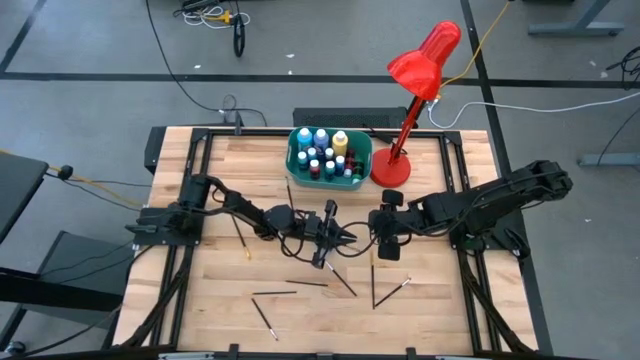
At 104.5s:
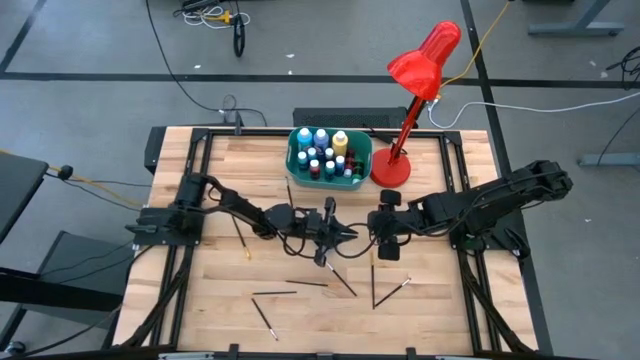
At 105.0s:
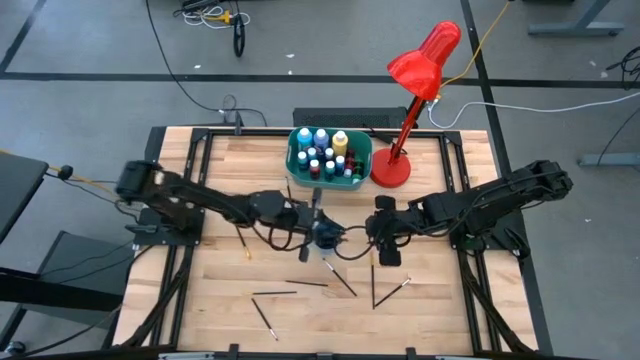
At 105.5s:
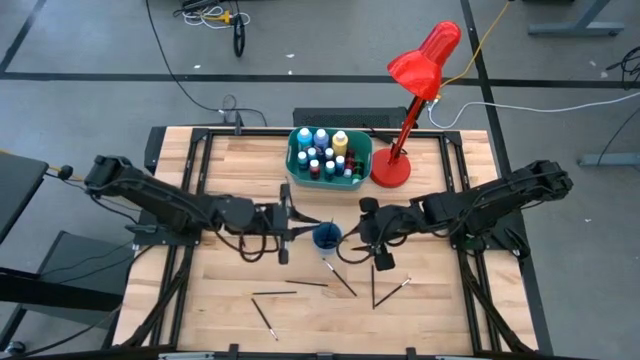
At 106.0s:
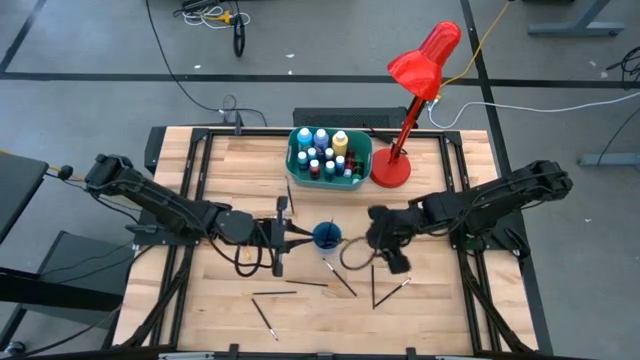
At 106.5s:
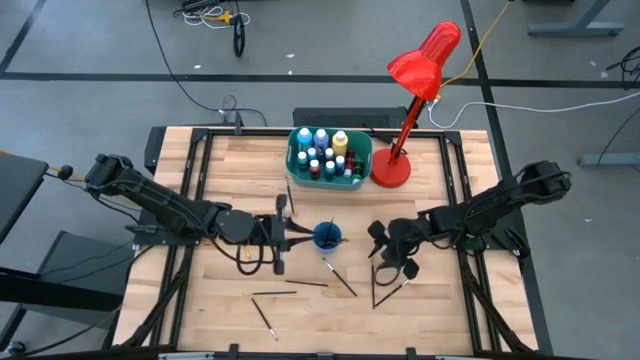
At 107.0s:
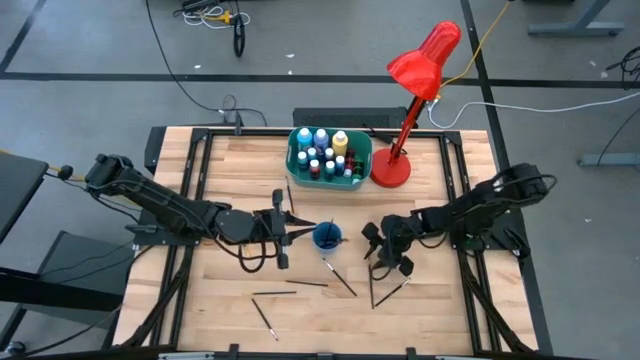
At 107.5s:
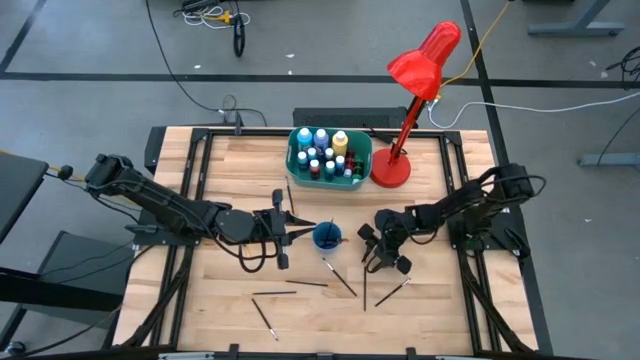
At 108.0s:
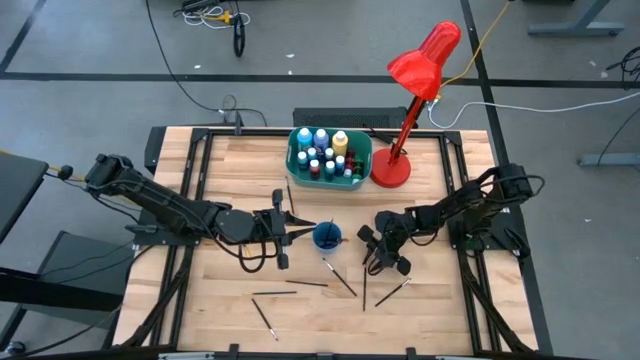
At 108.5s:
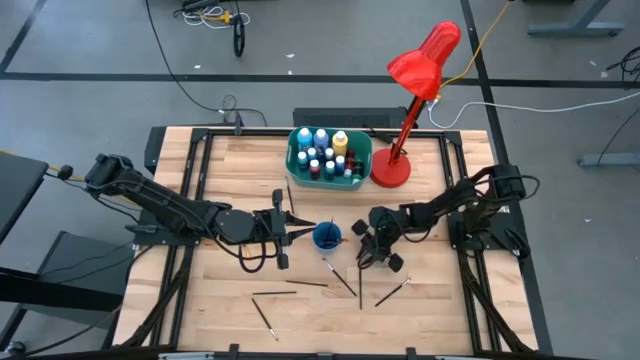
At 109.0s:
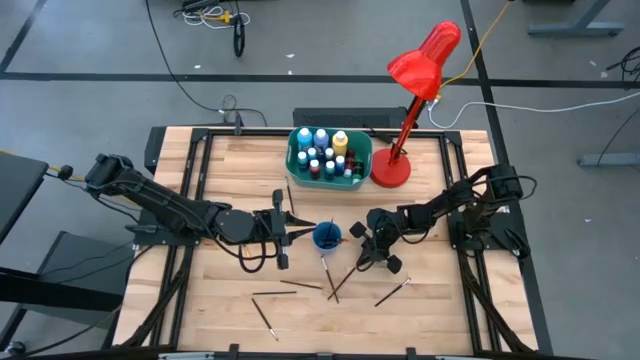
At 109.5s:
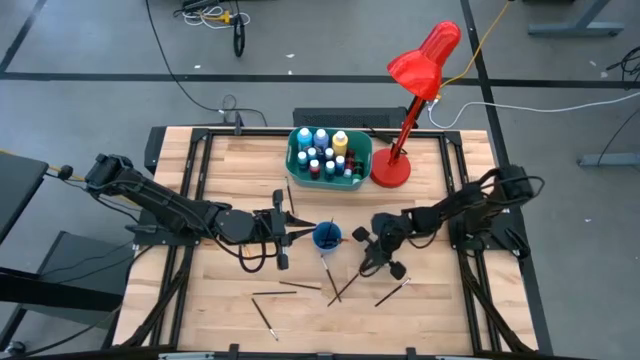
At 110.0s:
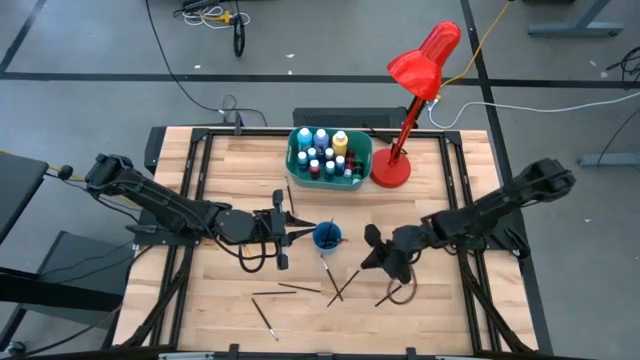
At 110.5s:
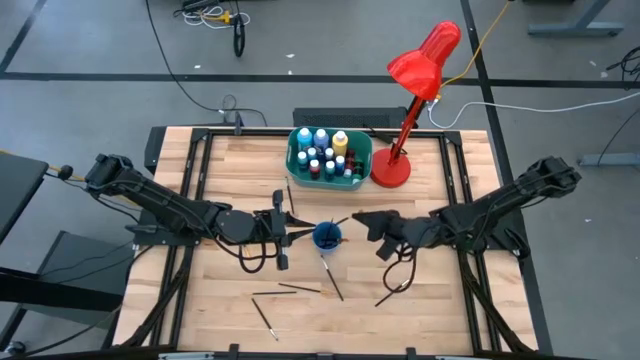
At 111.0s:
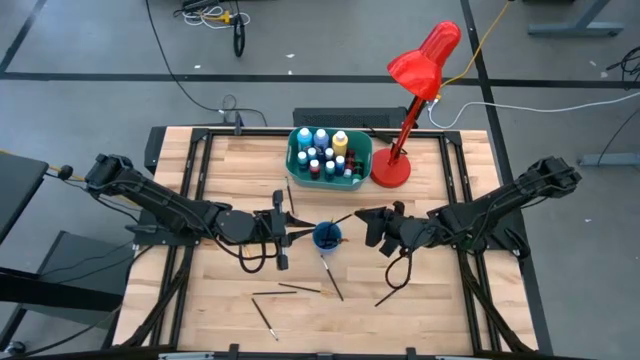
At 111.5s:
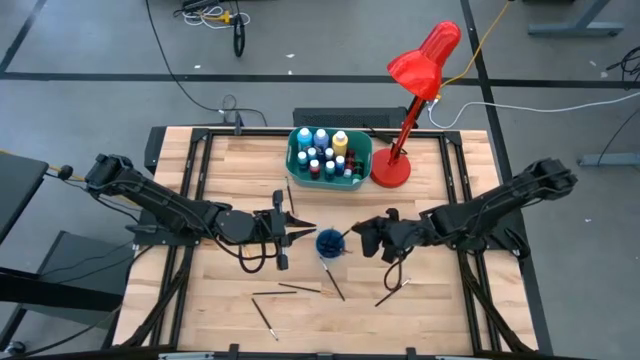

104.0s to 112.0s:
Task: Pick & Place Paint Supplies
Put the gold paint brush into the blue cup

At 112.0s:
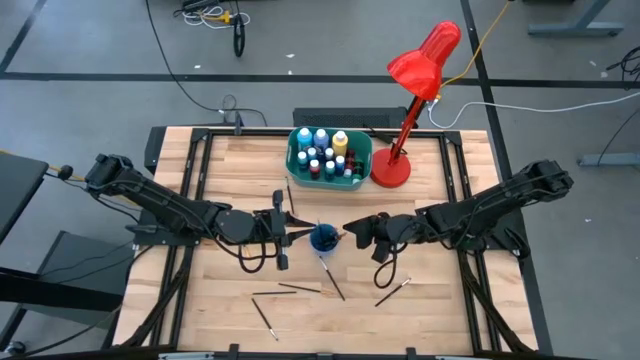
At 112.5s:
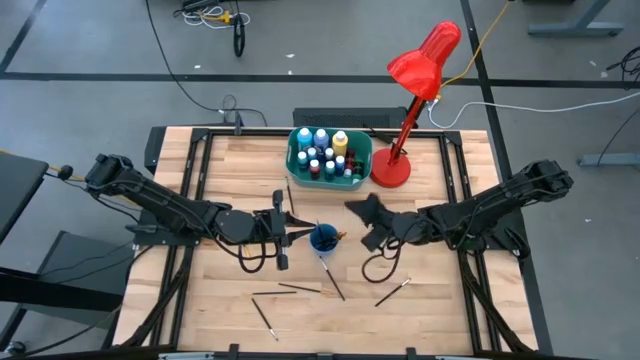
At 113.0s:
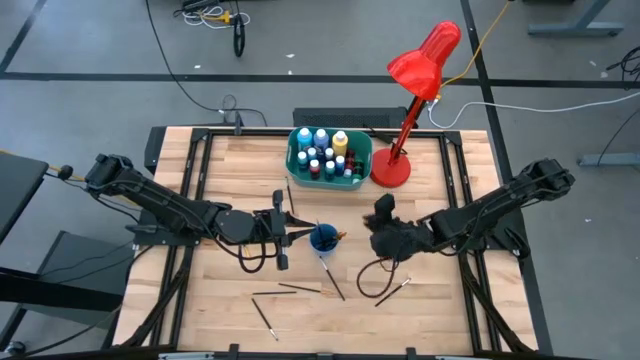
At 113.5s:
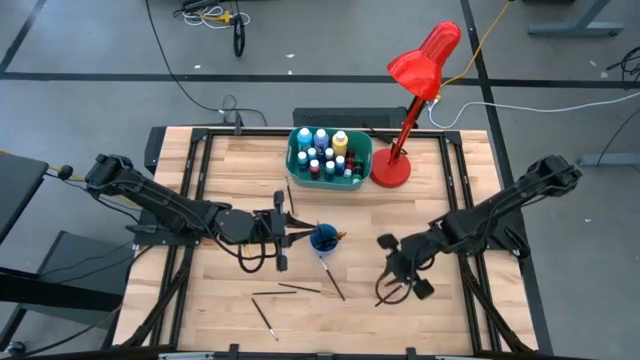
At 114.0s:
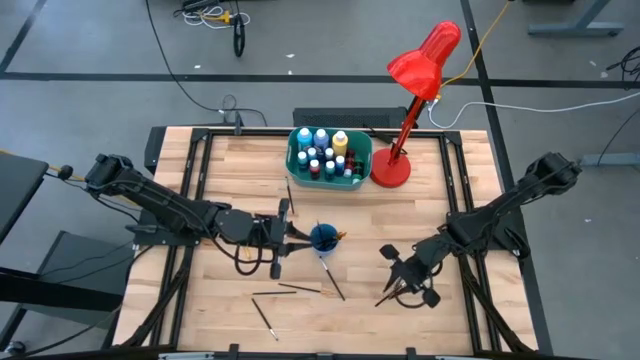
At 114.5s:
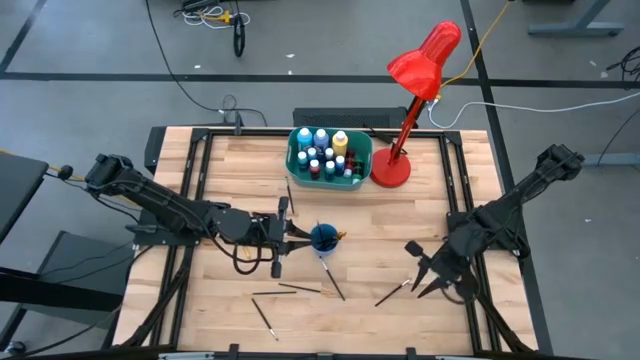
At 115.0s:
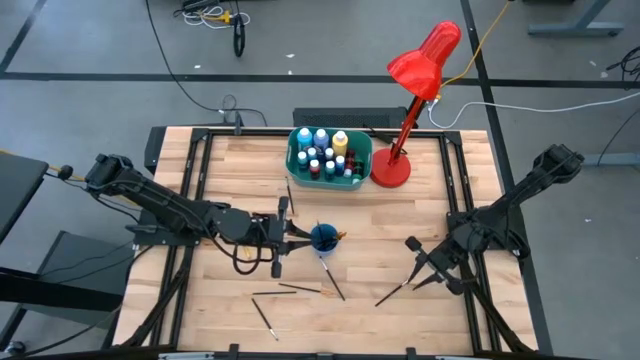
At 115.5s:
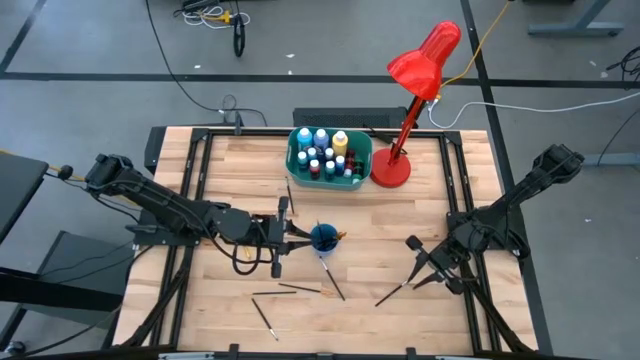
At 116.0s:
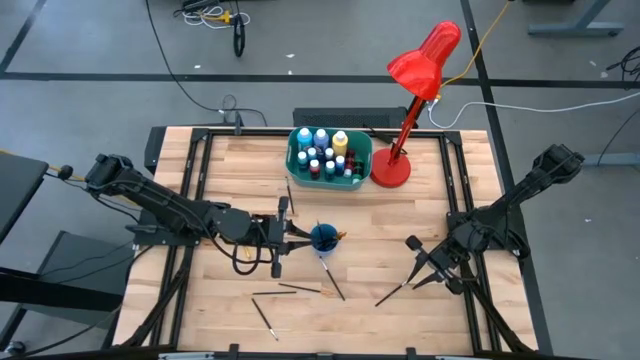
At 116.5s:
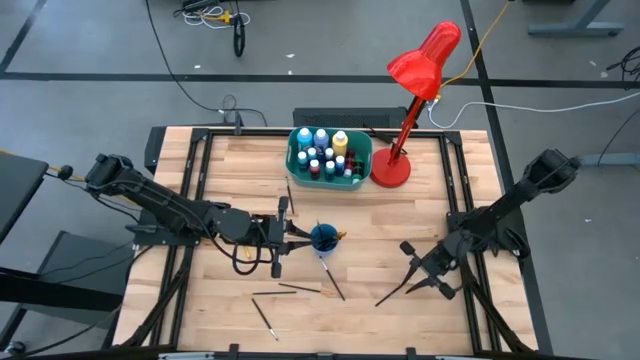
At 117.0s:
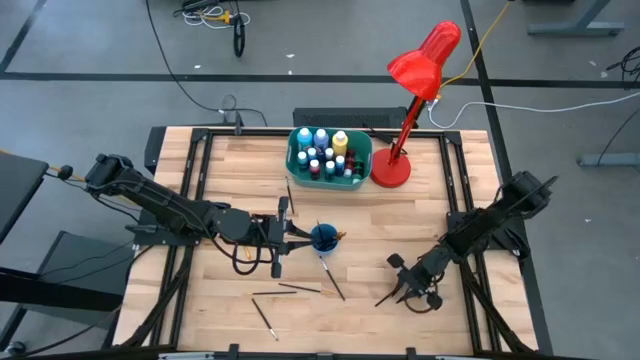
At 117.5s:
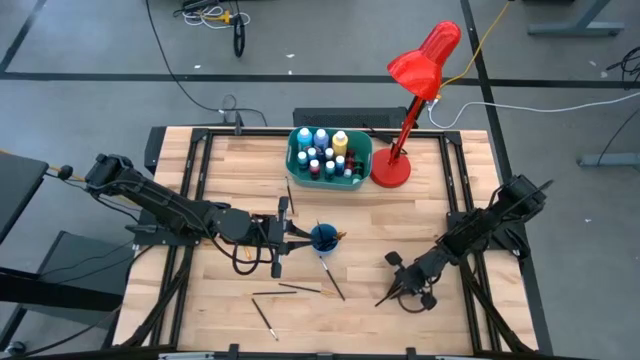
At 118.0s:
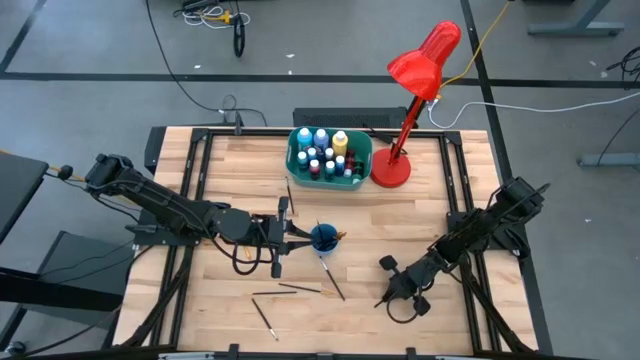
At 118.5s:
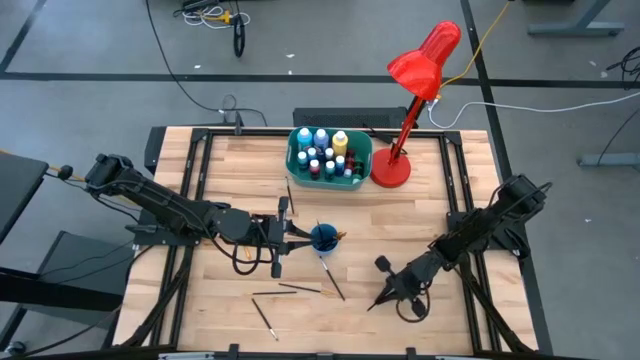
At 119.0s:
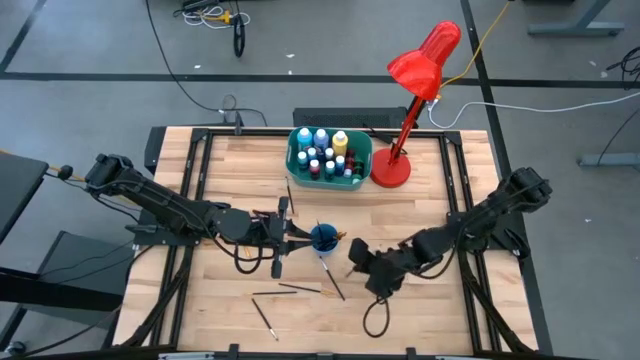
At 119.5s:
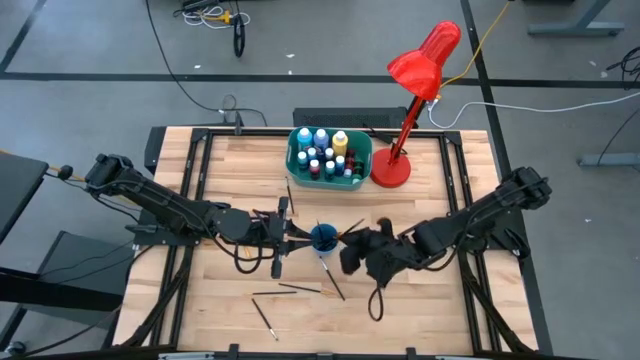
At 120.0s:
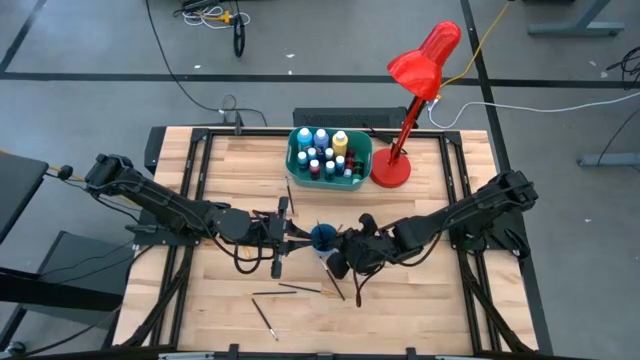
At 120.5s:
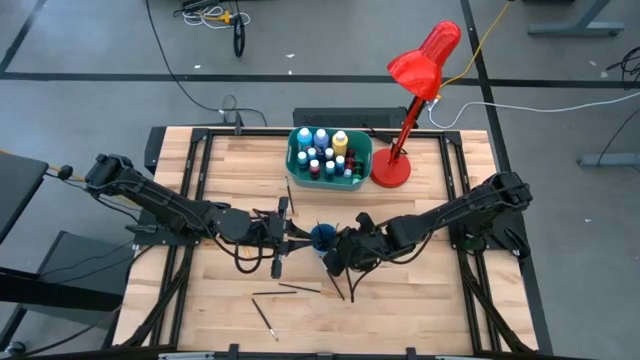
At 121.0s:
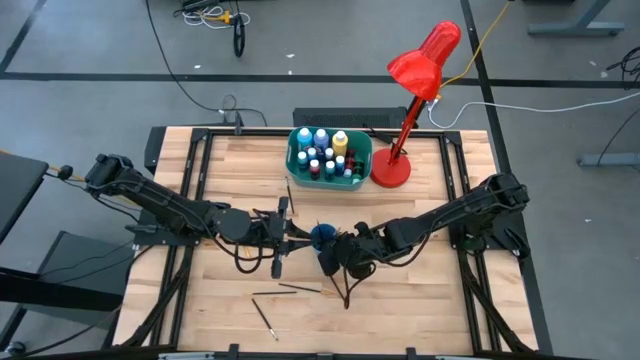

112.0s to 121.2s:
Put the silver paint brush into the blue cup
